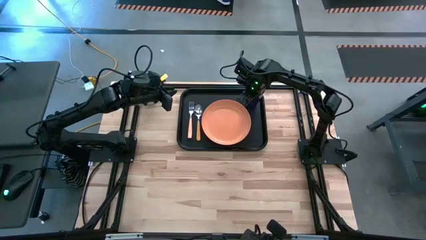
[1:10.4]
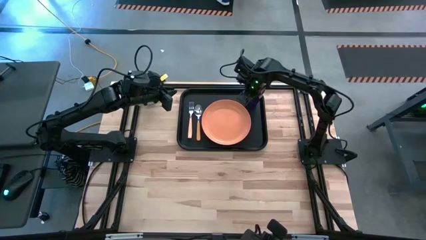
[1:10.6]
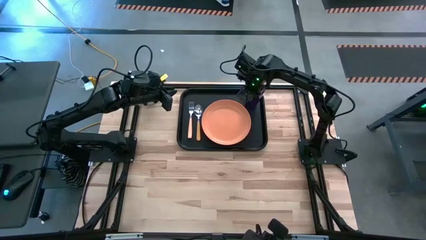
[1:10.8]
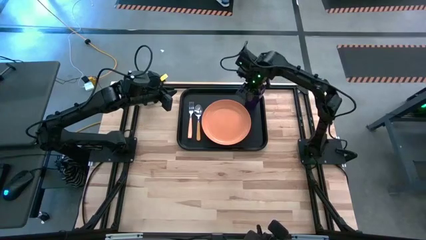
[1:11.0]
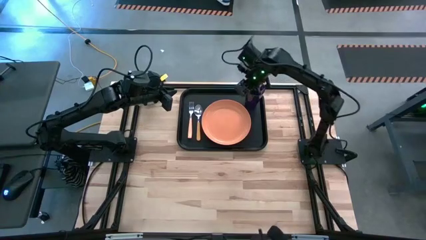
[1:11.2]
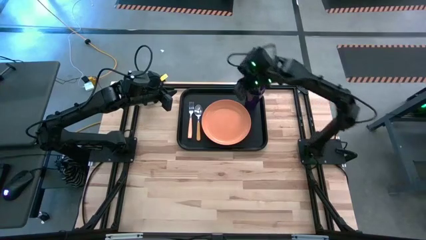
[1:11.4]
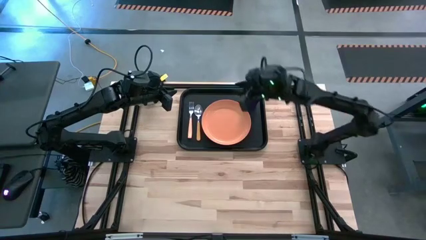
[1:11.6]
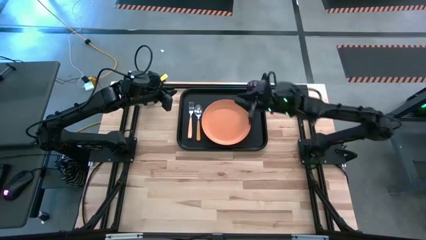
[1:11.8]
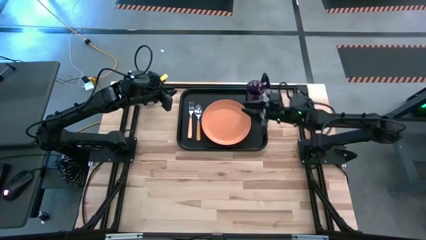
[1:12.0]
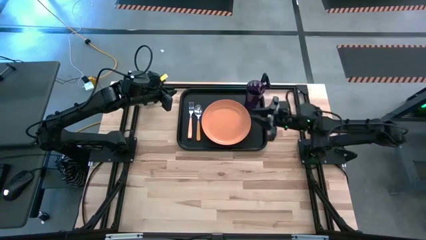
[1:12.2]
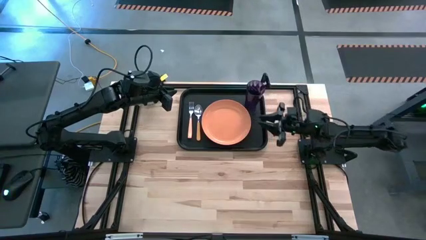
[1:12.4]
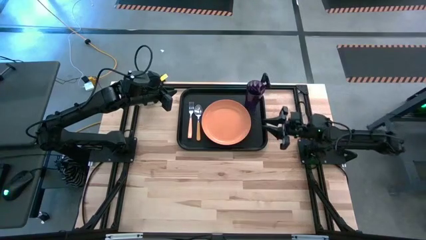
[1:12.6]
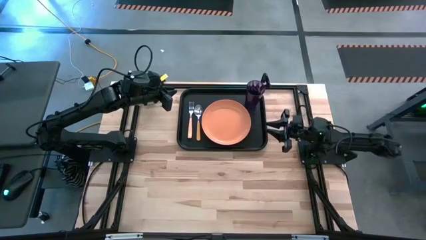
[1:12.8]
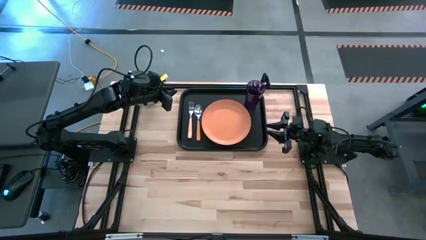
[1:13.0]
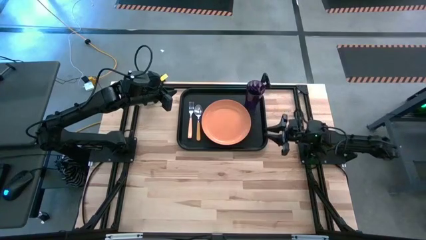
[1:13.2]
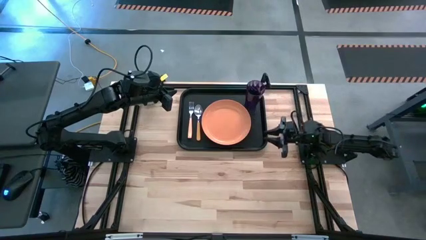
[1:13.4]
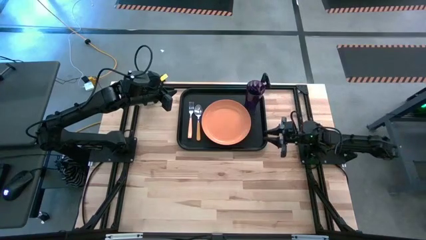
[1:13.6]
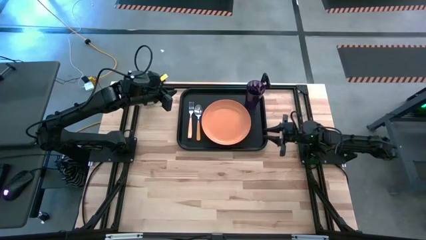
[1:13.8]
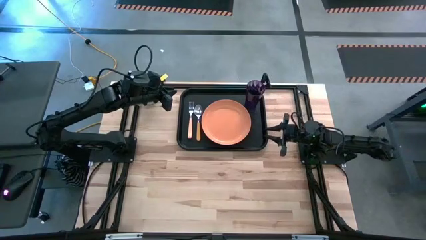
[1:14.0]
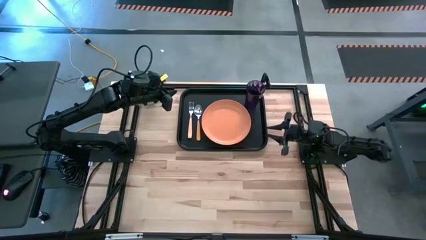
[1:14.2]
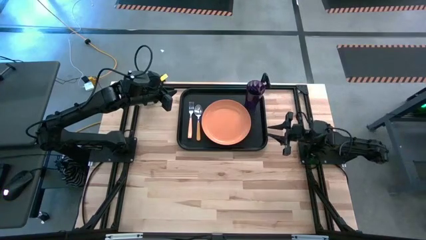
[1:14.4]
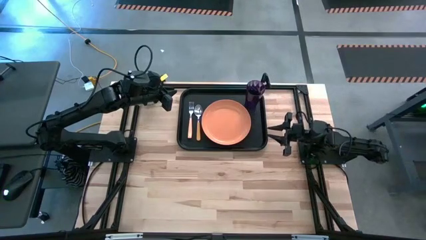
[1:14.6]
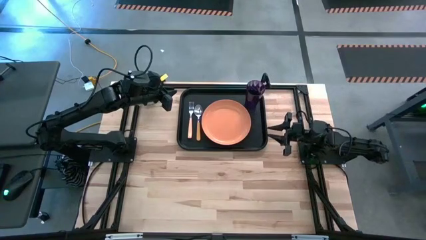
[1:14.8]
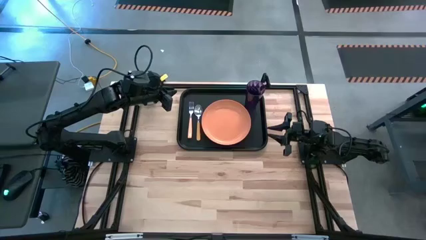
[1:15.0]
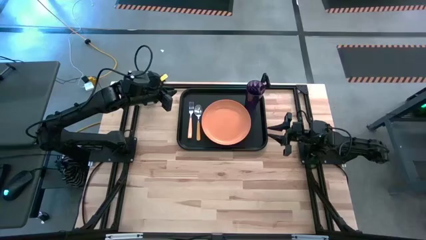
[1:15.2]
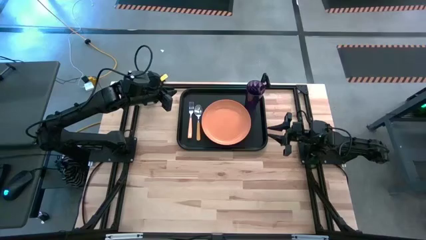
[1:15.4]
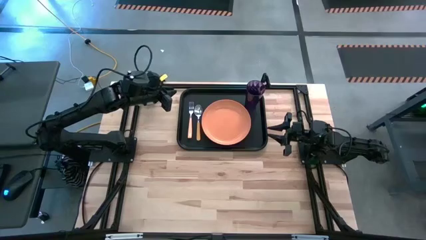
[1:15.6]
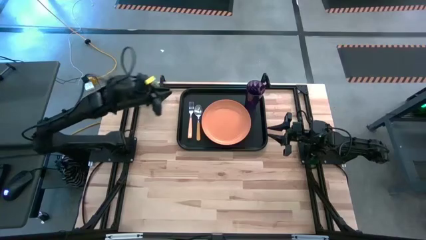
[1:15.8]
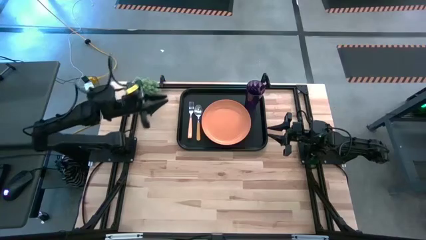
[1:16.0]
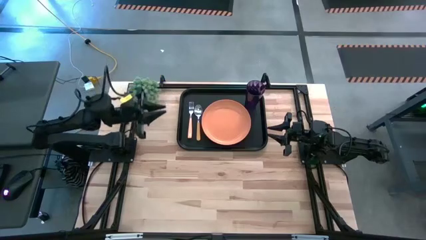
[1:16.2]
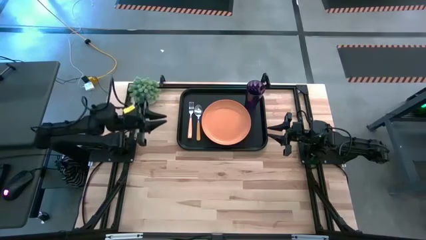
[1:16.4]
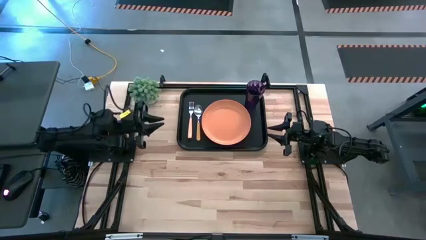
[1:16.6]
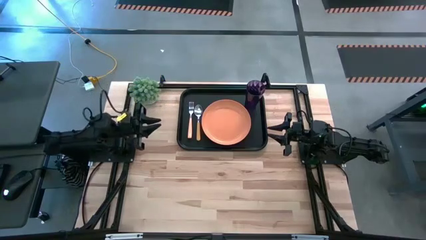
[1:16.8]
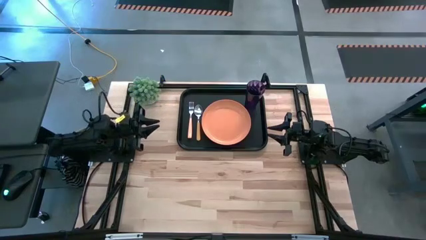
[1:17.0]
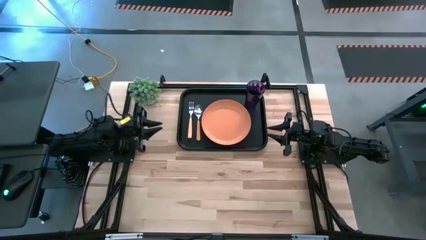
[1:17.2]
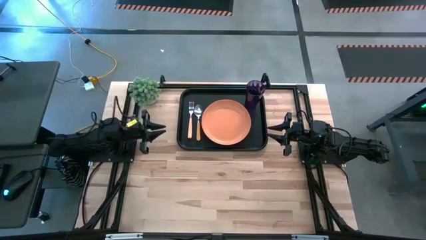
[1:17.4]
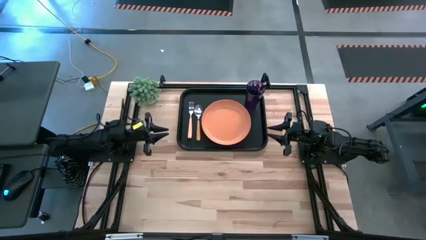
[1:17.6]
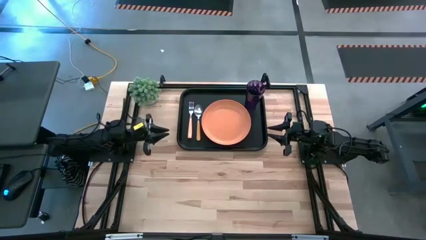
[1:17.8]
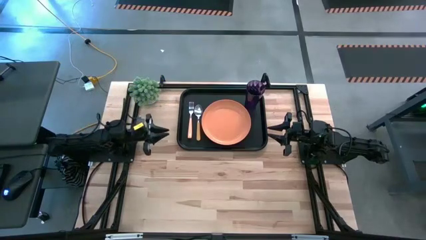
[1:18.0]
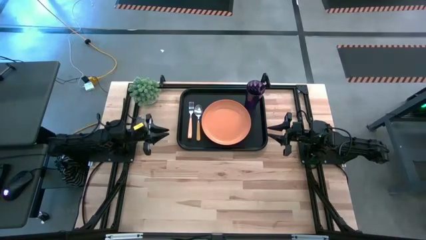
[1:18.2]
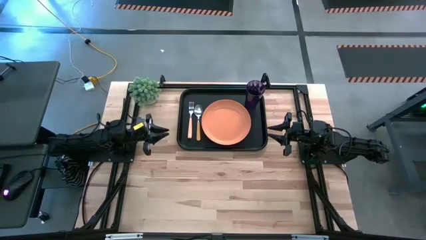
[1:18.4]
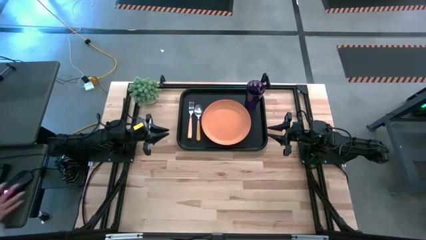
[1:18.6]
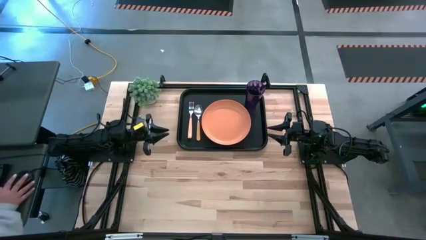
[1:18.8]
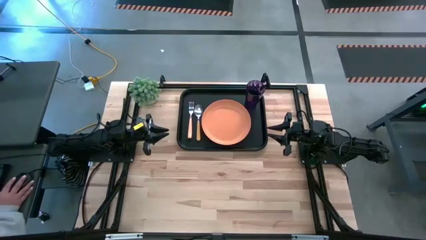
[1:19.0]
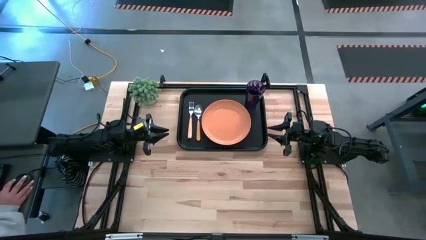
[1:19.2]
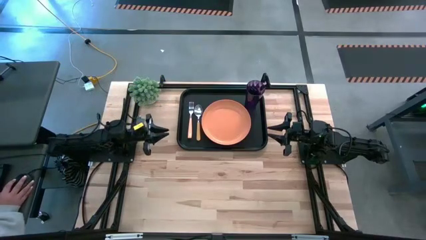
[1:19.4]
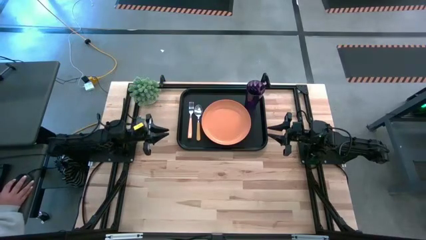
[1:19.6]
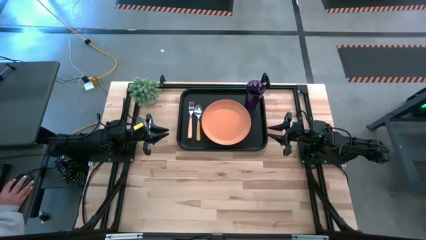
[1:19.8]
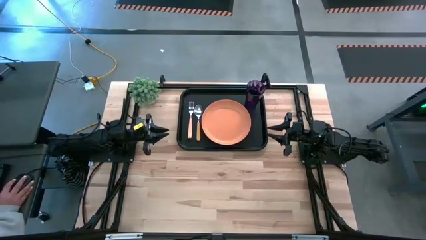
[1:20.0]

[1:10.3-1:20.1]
Task: Pick and place plate/cup/fork/spoon on tray
Return to Home Position

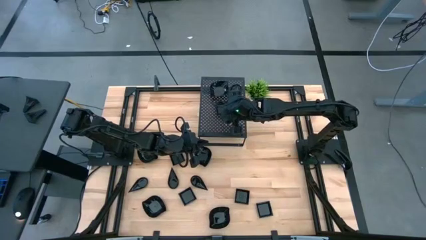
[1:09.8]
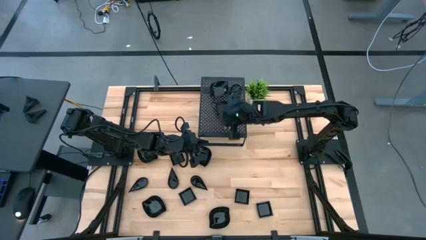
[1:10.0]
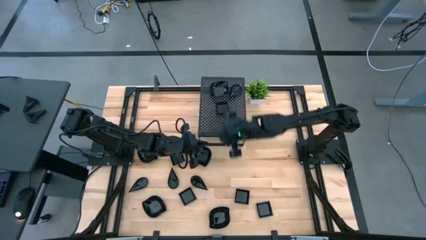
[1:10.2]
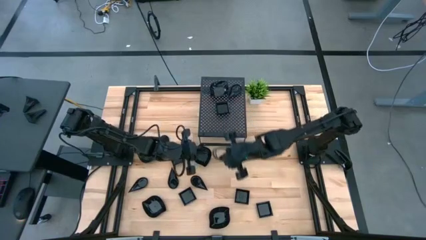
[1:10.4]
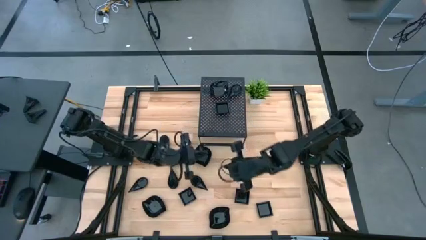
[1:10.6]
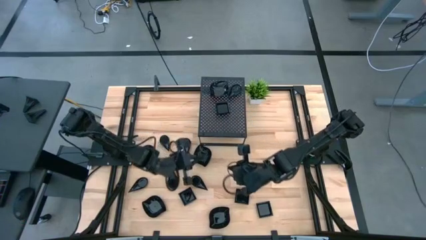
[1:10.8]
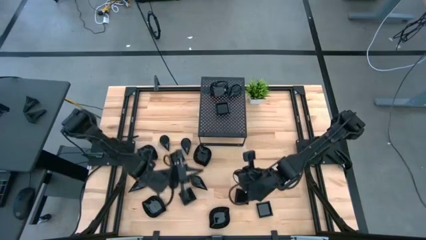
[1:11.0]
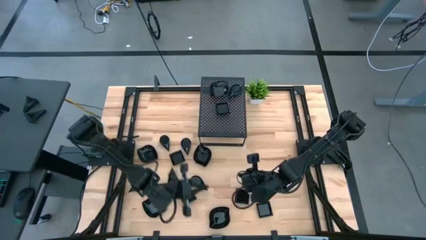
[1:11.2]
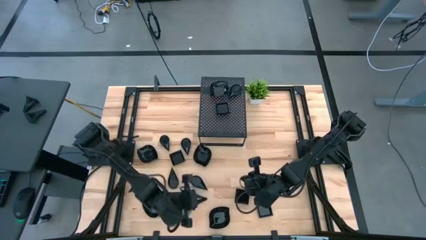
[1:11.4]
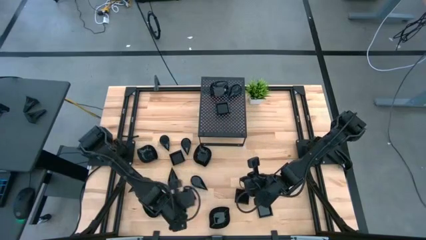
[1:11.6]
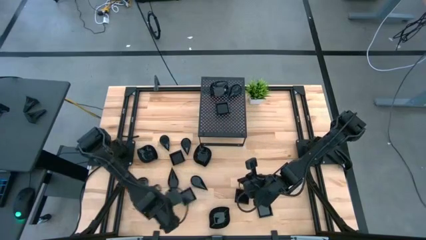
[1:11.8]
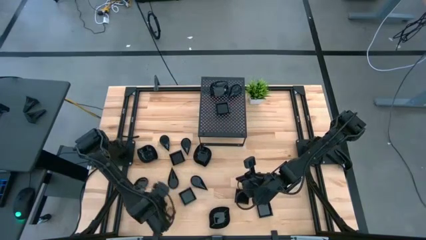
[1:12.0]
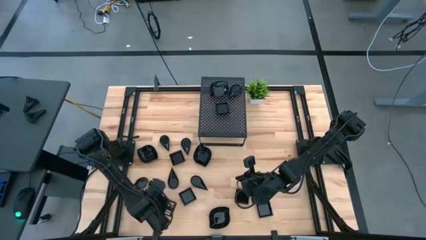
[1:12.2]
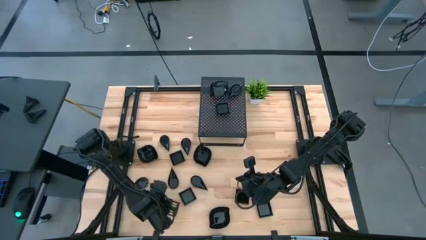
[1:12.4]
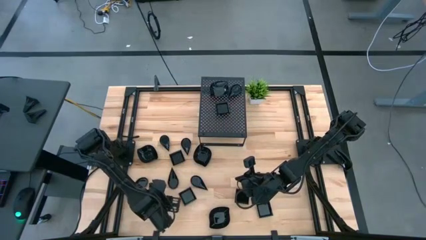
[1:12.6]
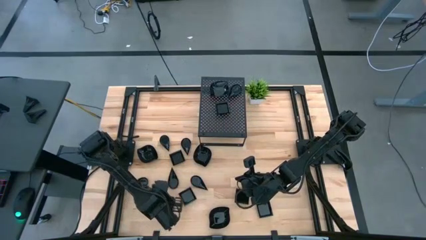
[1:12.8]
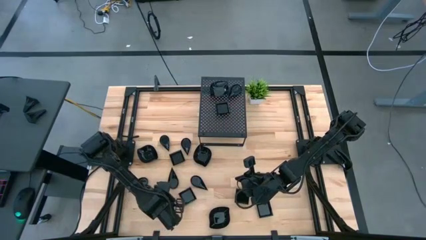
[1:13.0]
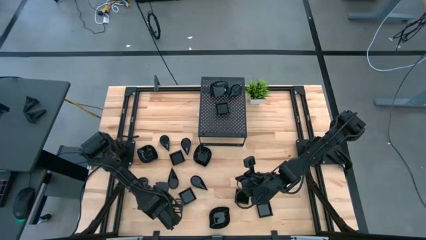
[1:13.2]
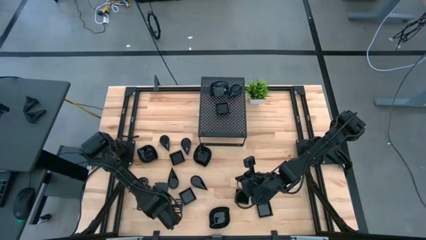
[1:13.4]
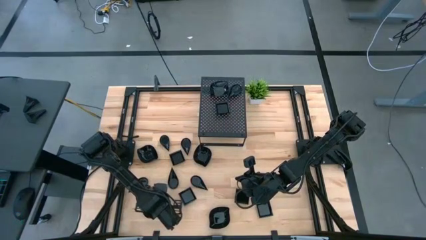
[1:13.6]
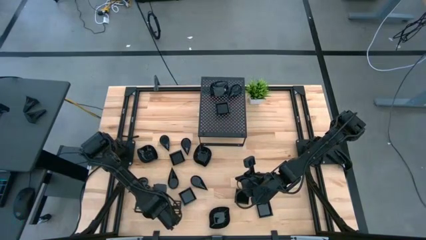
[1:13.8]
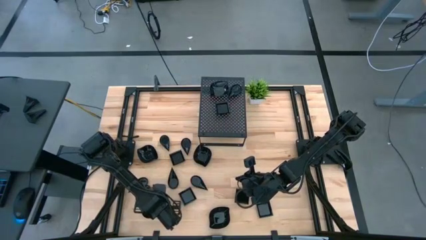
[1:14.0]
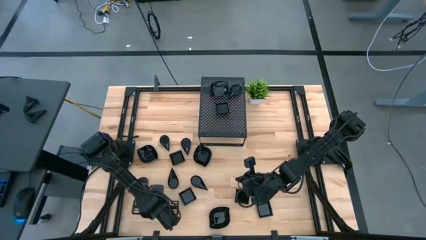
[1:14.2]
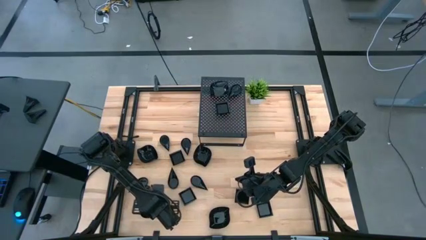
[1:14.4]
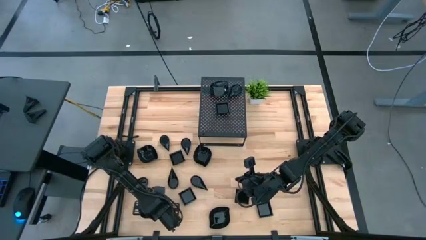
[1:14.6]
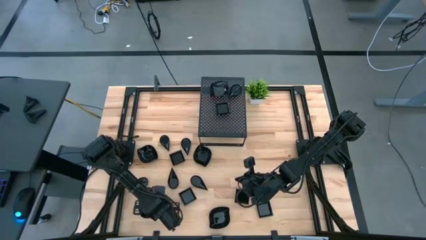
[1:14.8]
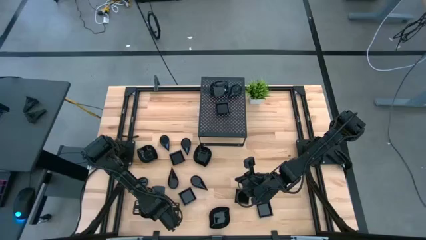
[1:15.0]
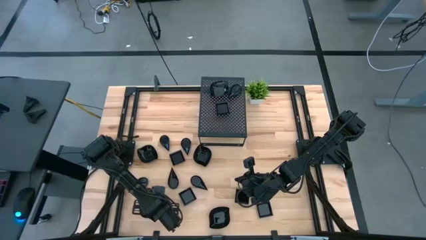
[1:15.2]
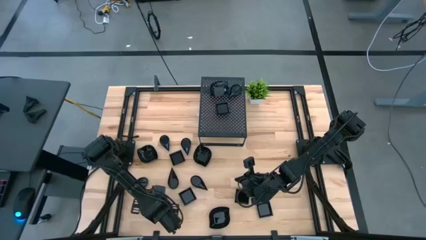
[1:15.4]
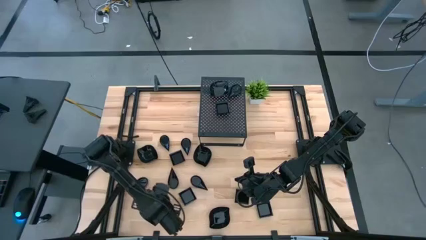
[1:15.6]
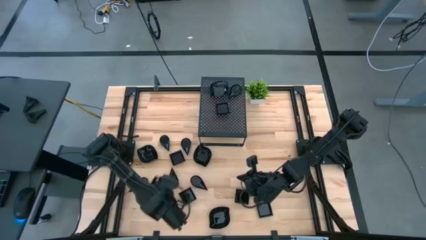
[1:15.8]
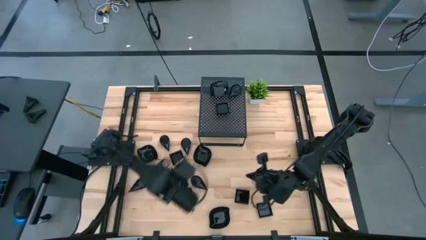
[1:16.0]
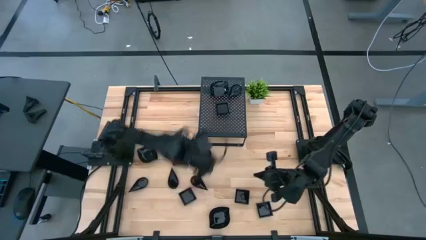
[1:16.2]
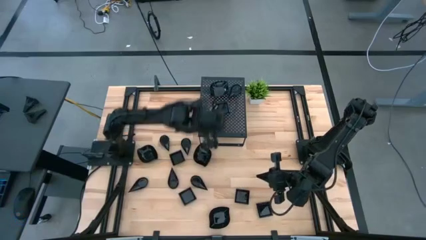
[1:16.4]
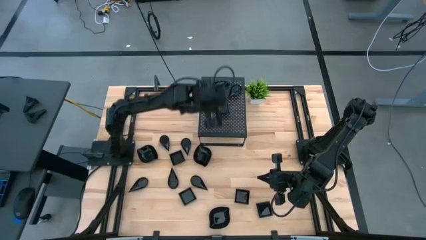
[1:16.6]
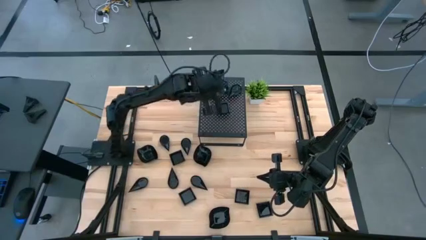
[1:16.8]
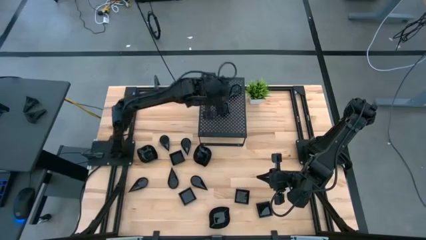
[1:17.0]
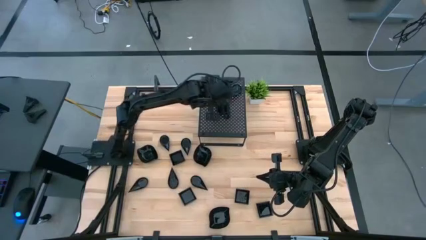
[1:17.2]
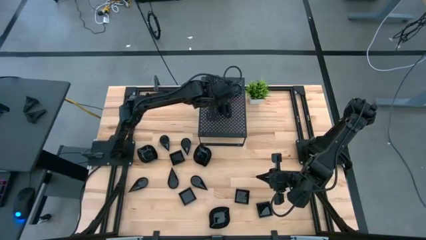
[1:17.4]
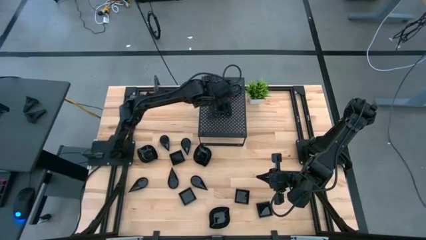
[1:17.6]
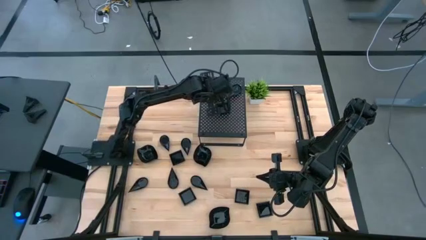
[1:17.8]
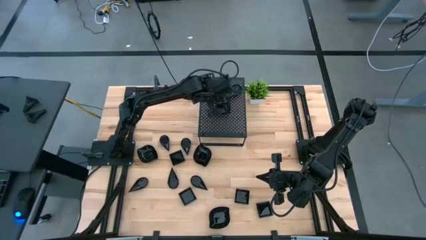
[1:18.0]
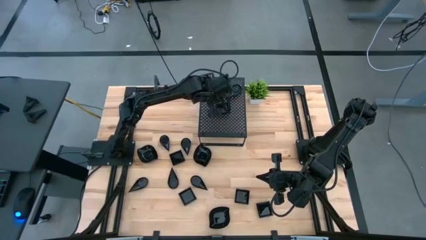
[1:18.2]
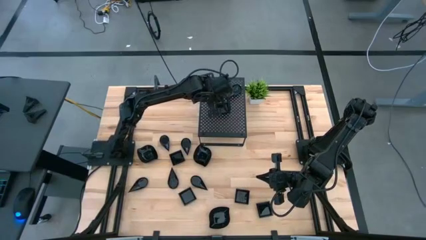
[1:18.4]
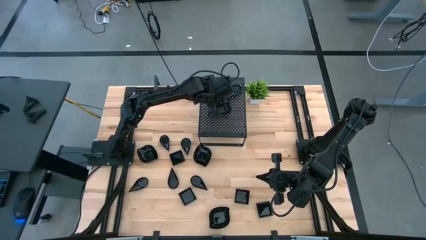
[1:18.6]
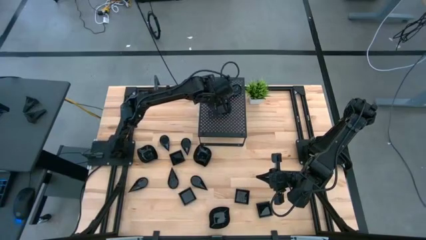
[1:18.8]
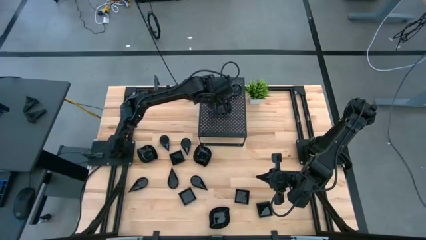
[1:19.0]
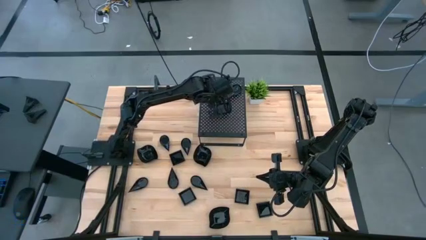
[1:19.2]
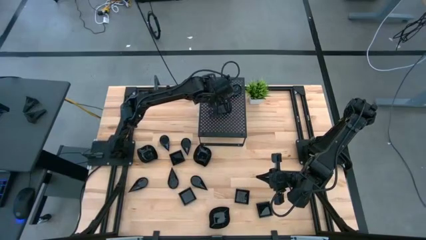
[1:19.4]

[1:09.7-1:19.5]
Task: Pick & Place Mini shaped plates
Stack the black leaf-shaped plate on top of the black leaf-shaped plate on the shelf
